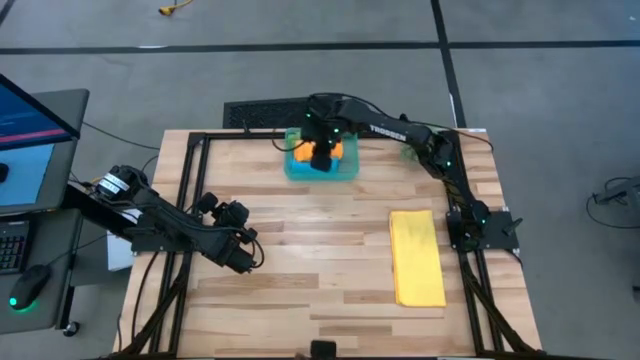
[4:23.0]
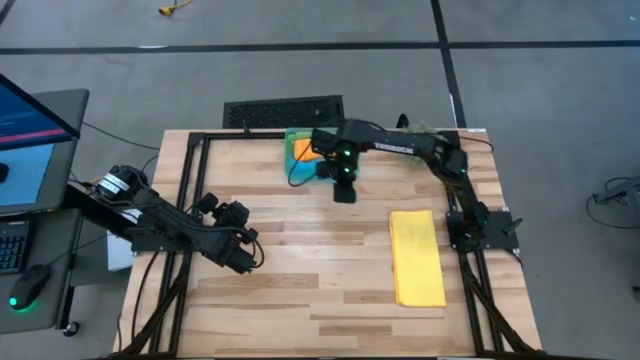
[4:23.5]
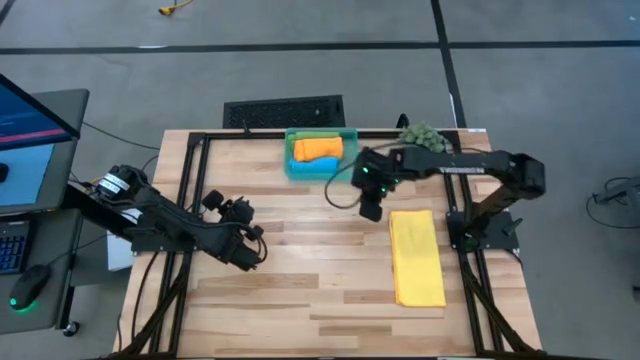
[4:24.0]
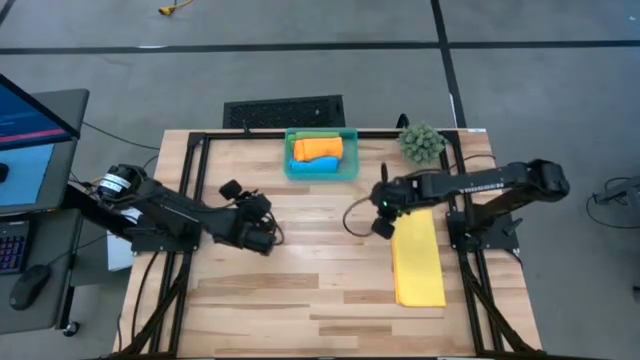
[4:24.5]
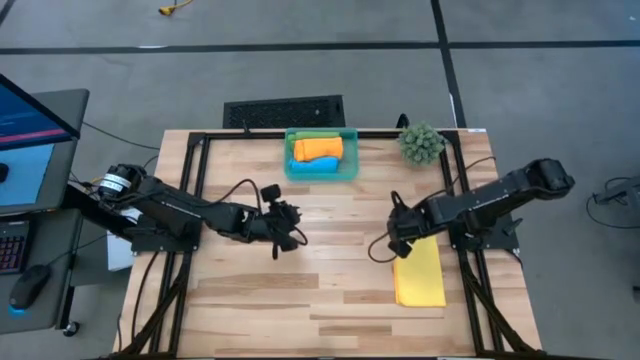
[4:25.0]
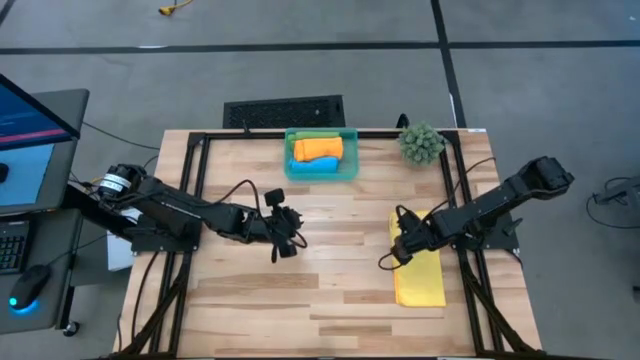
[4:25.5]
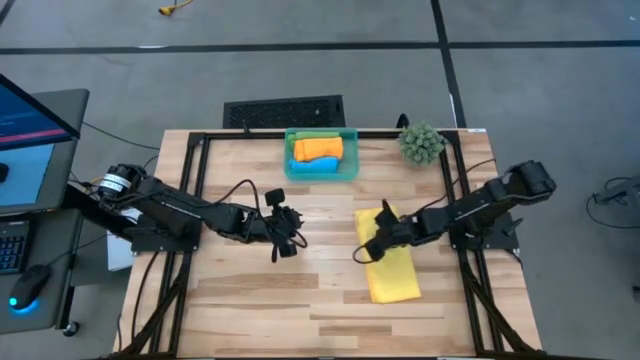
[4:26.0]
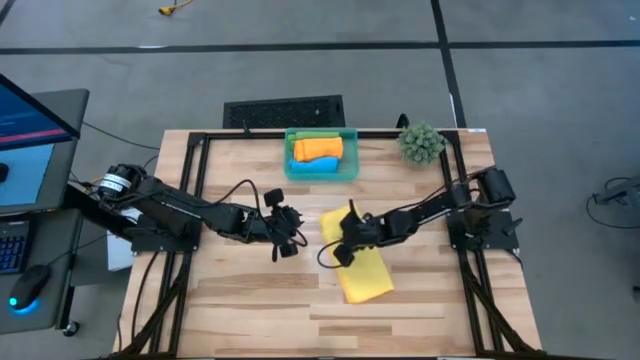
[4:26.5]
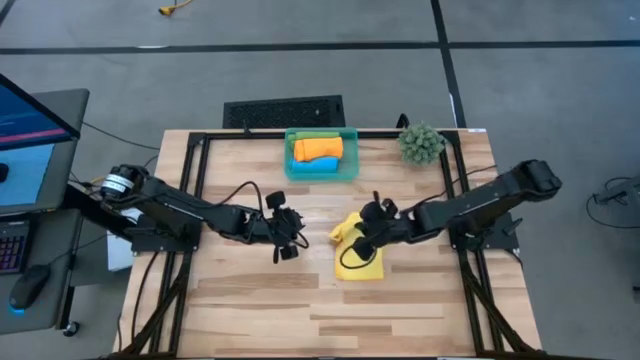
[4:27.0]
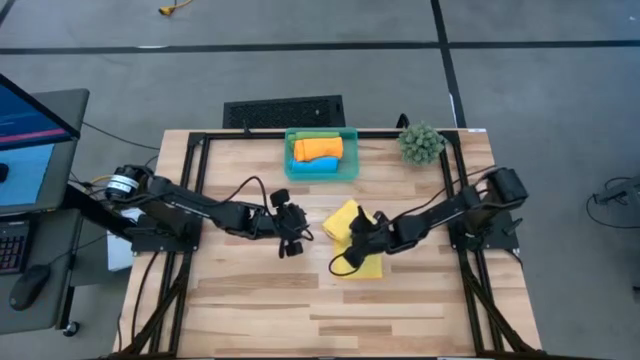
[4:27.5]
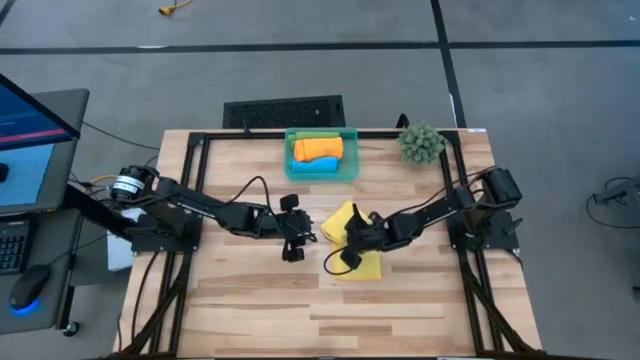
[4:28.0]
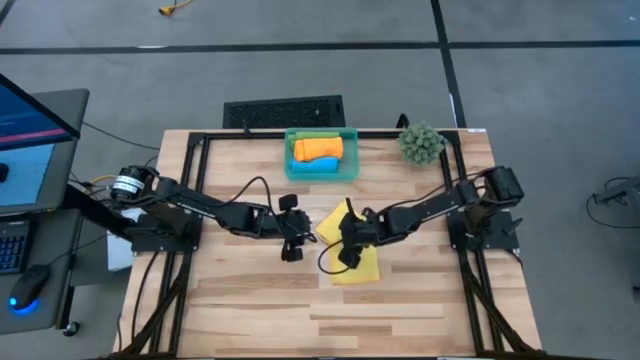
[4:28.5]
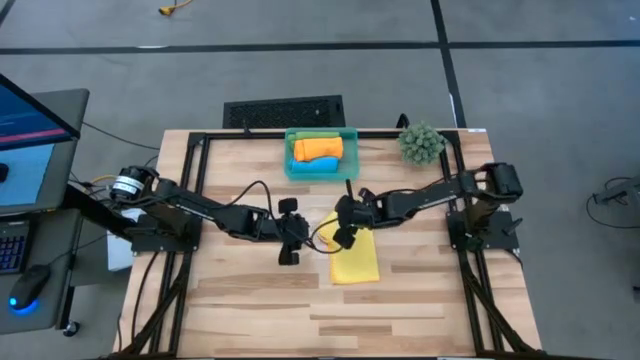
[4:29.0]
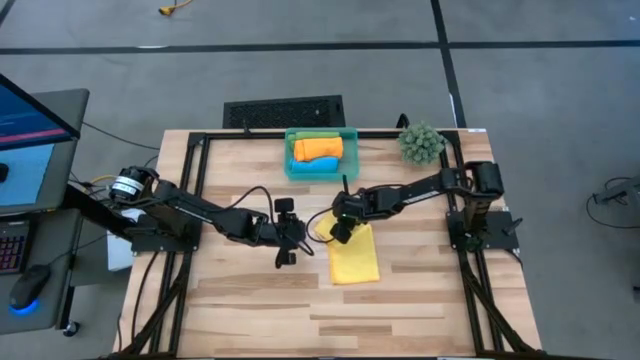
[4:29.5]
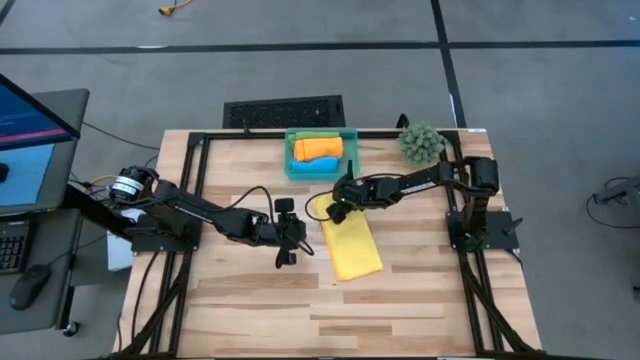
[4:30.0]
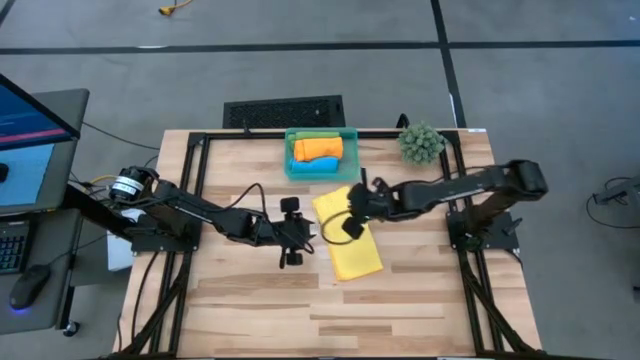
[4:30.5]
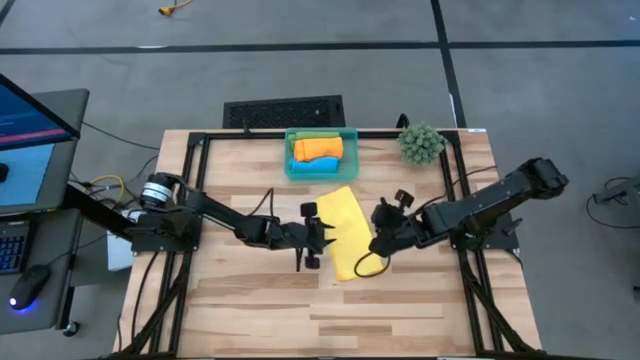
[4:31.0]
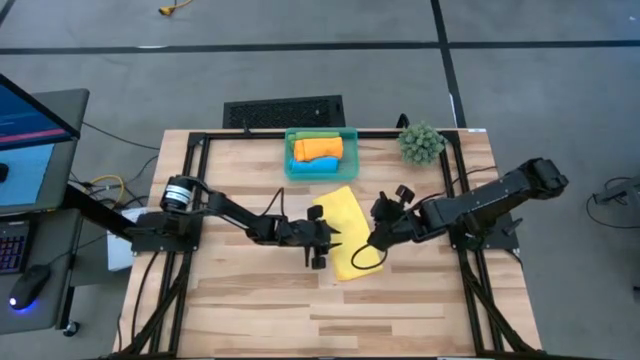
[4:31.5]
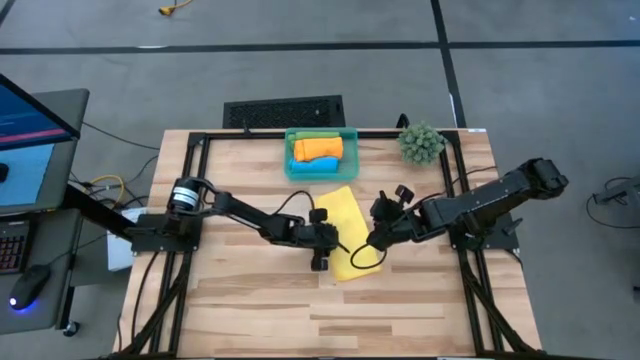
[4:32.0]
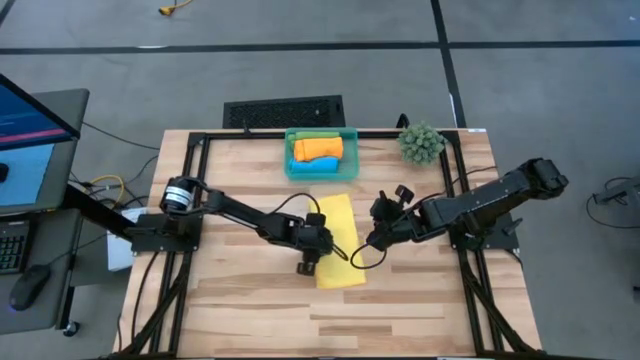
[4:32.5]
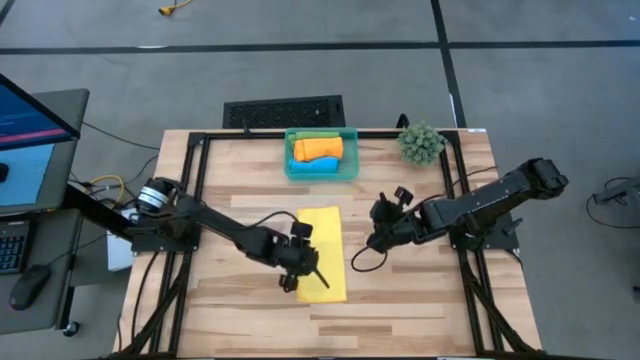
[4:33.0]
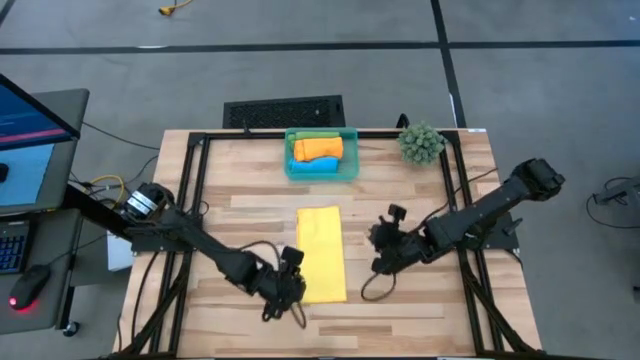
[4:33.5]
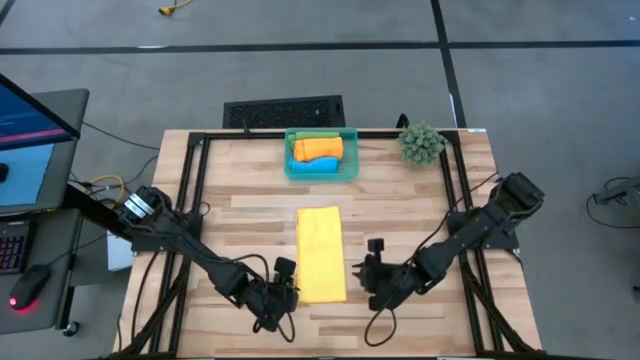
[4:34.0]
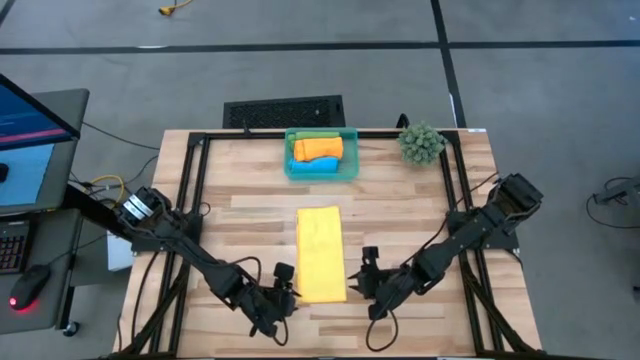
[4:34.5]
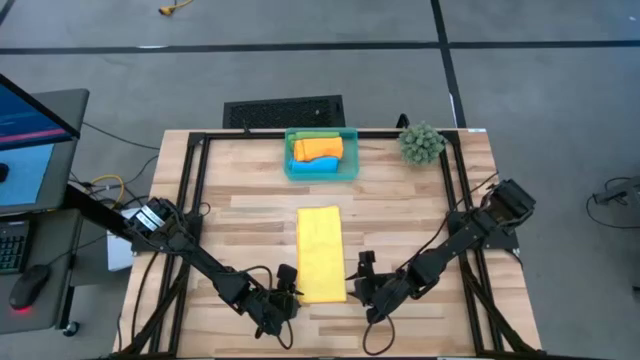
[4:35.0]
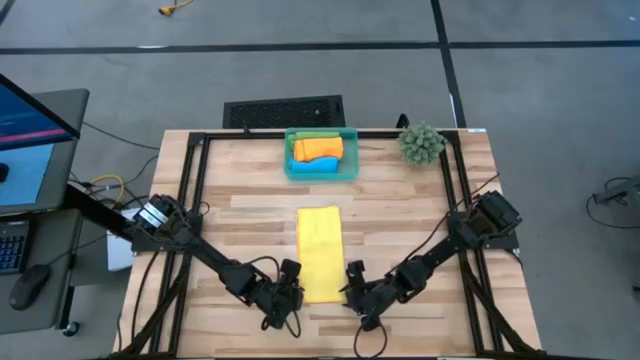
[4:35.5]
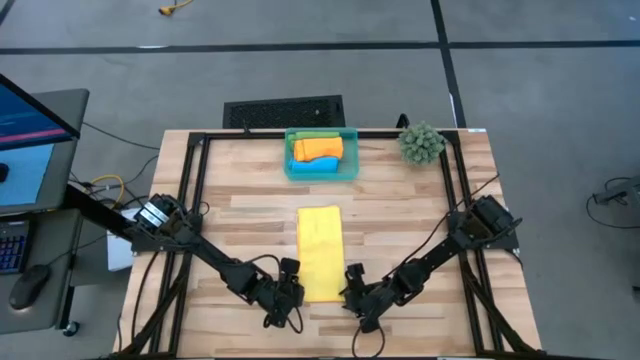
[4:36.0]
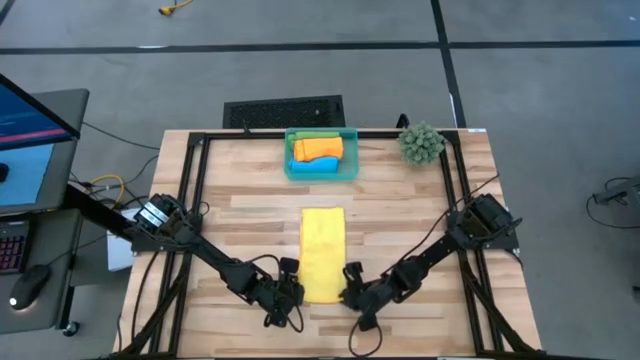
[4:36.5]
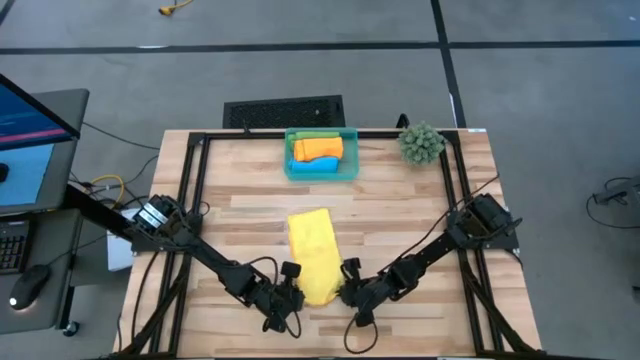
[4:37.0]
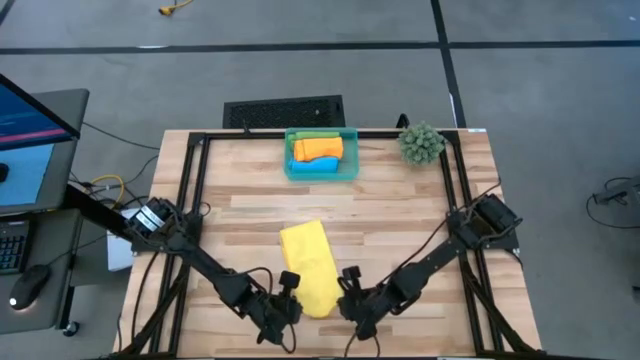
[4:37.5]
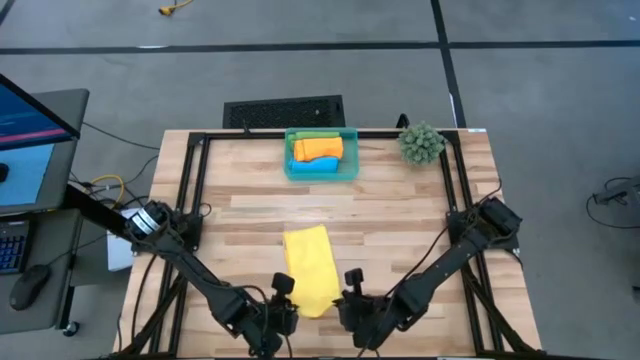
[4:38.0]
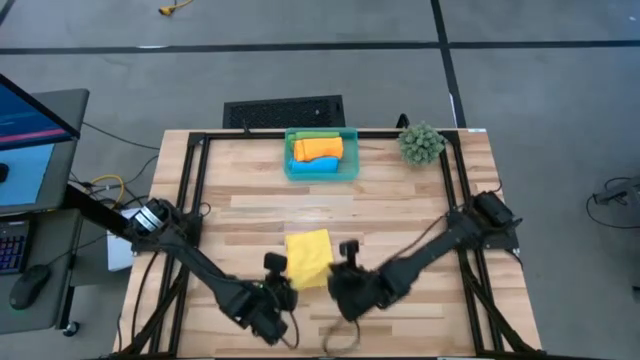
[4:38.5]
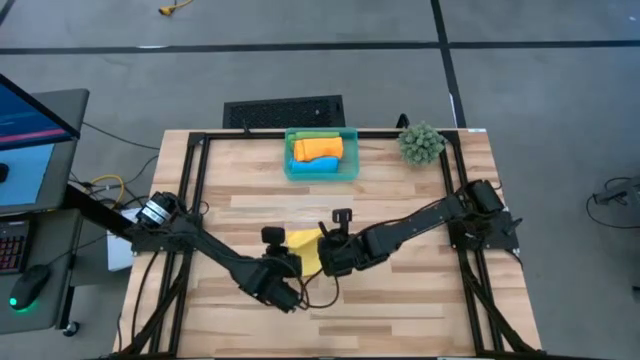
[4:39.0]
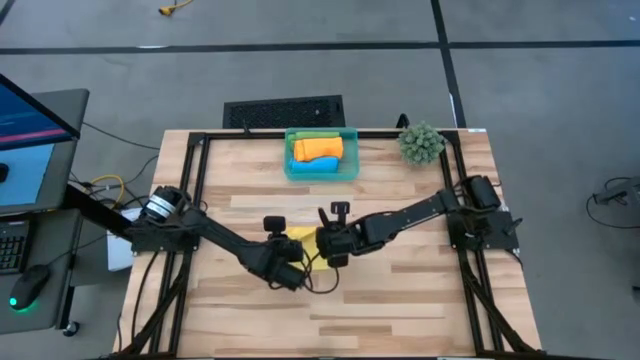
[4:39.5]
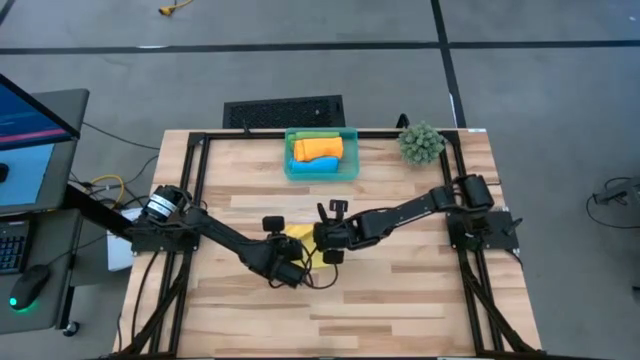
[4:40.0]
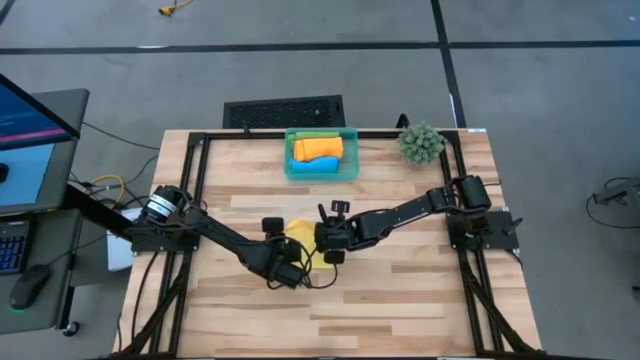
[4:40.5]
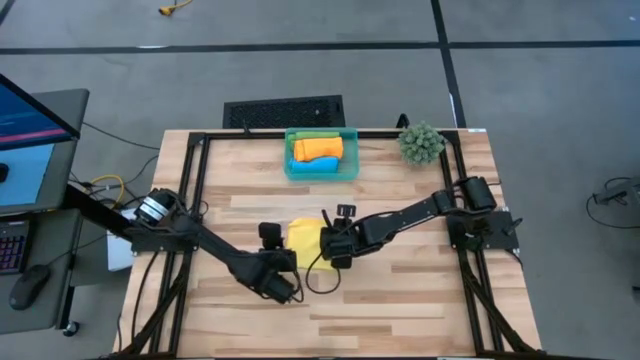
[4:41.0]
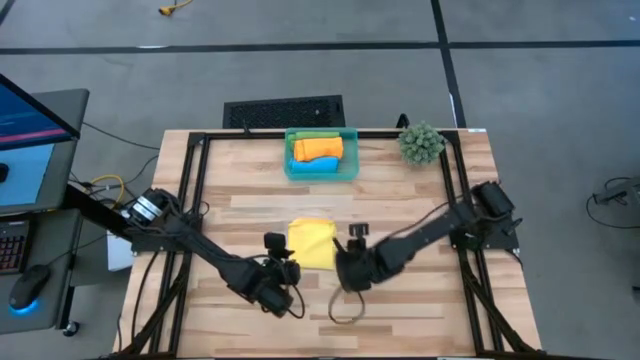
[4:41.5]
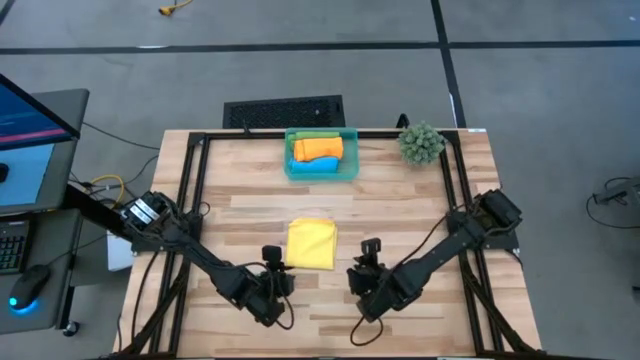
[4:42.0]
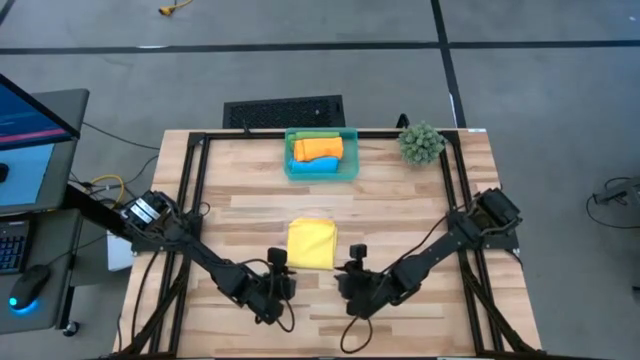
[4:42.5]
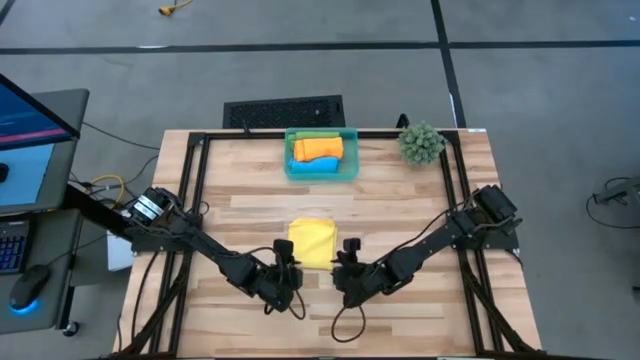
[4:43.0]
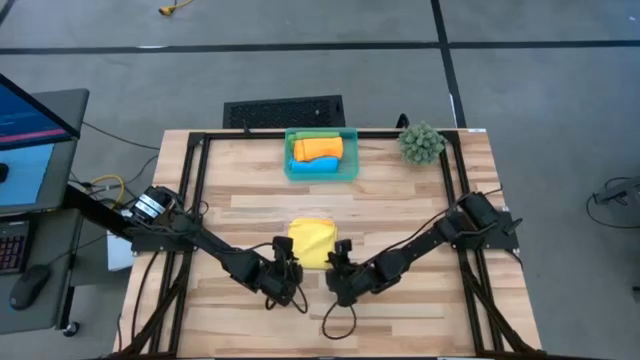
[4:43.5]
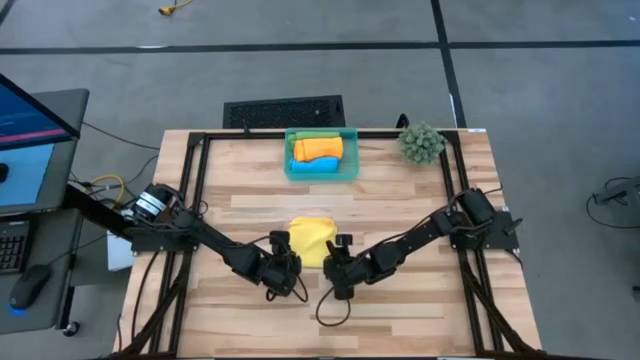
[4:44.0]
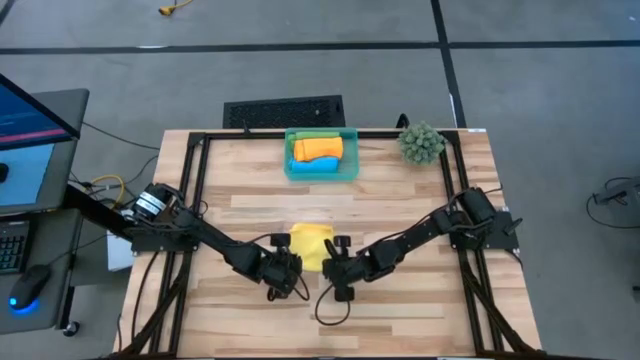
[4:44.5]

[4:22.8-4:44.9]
Task: Roll microfiber towels into tight, uniform cylinder then place into a basket
Roll the yellow towel
